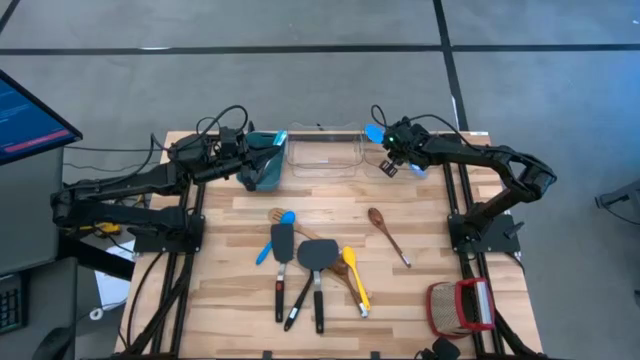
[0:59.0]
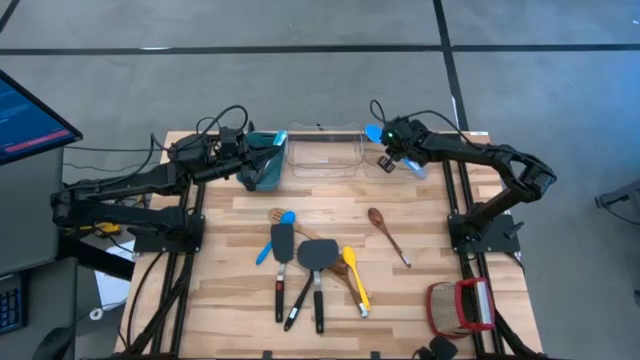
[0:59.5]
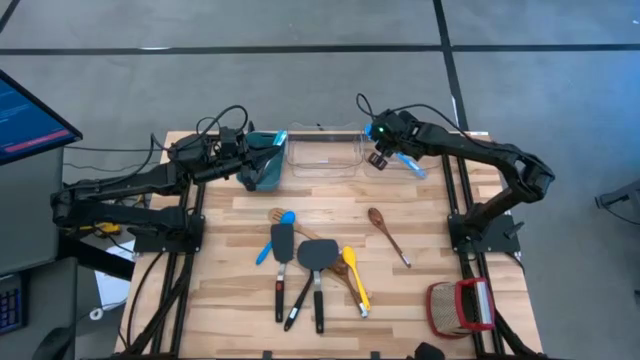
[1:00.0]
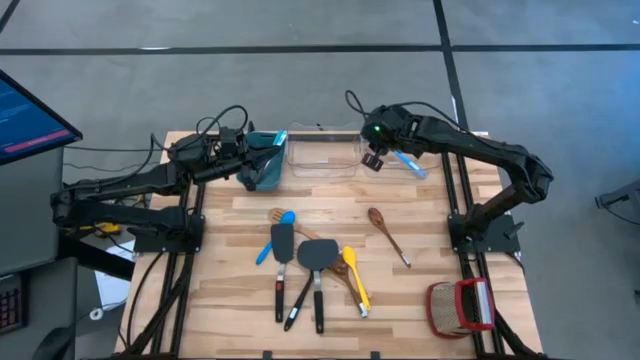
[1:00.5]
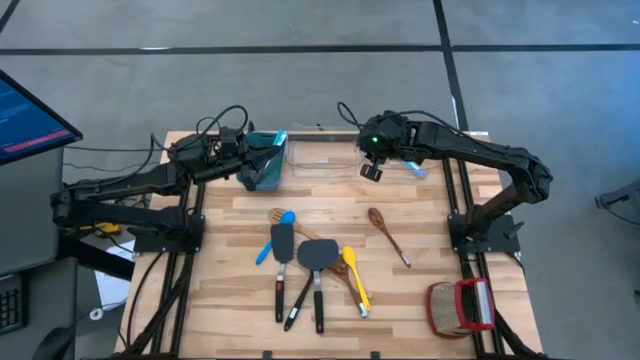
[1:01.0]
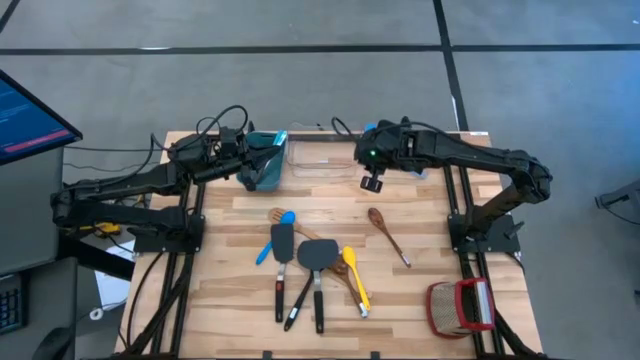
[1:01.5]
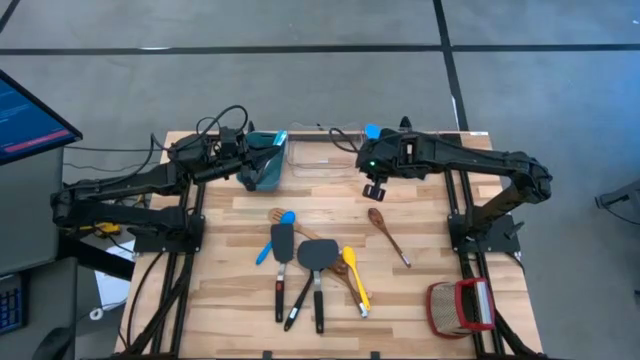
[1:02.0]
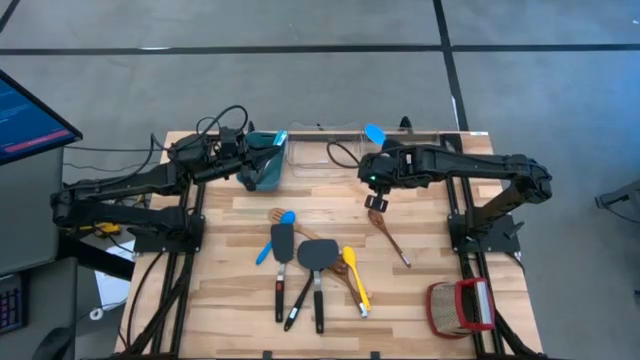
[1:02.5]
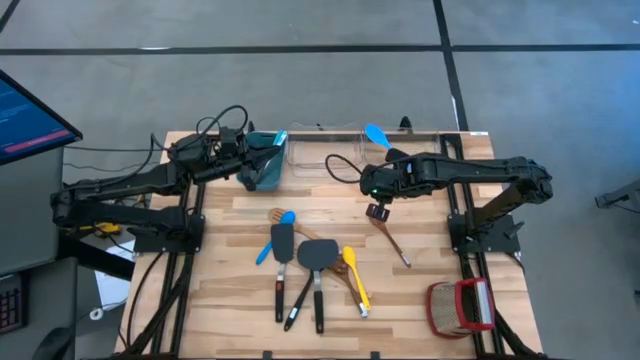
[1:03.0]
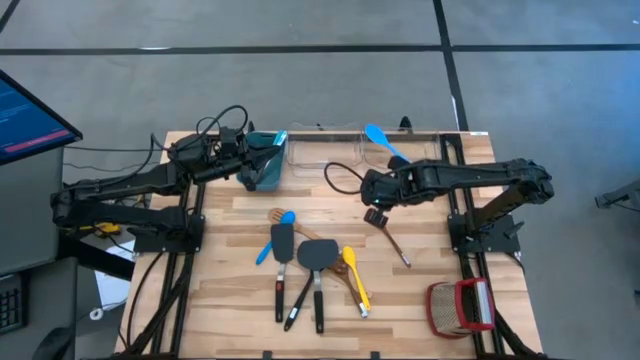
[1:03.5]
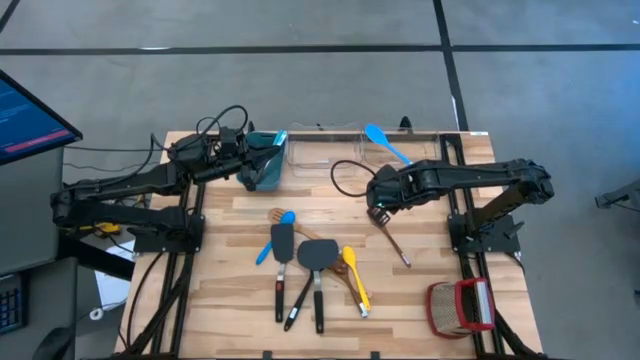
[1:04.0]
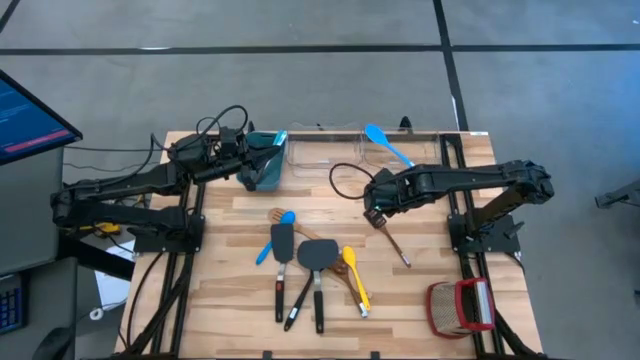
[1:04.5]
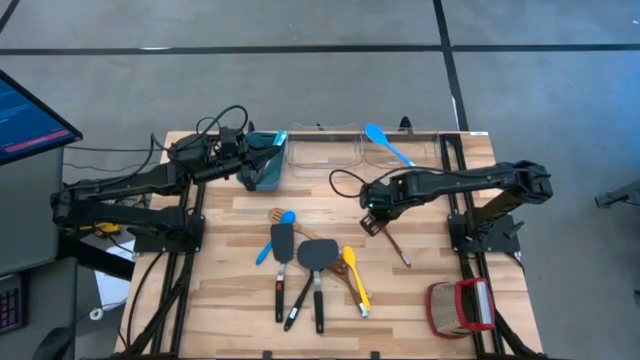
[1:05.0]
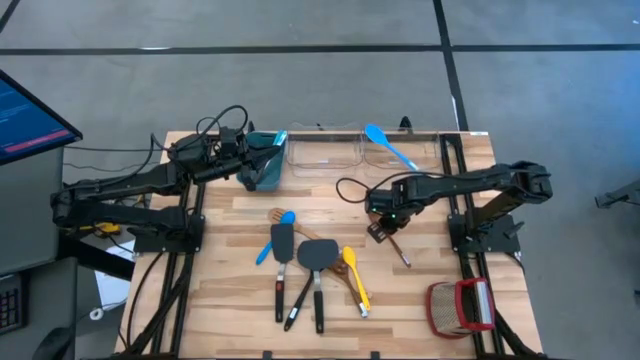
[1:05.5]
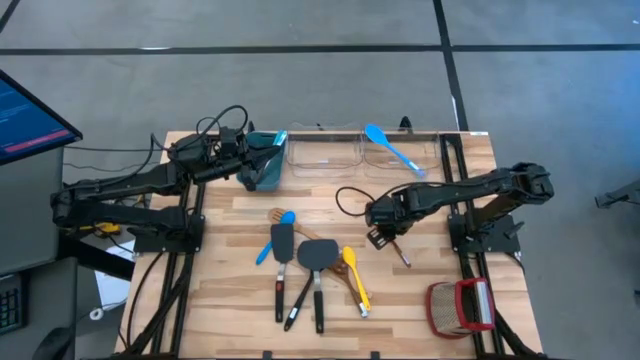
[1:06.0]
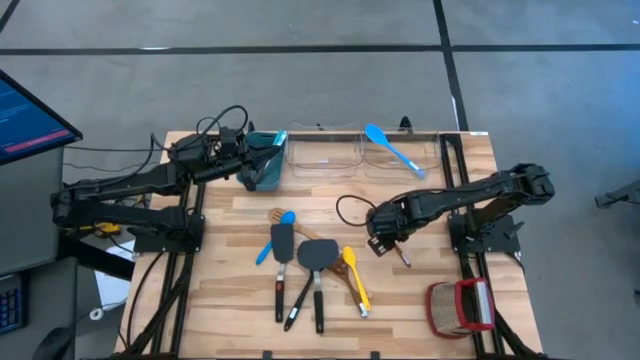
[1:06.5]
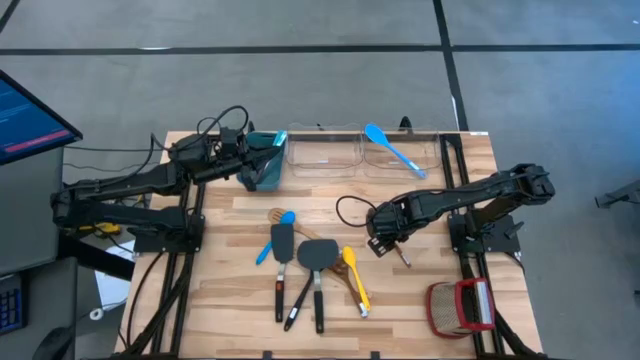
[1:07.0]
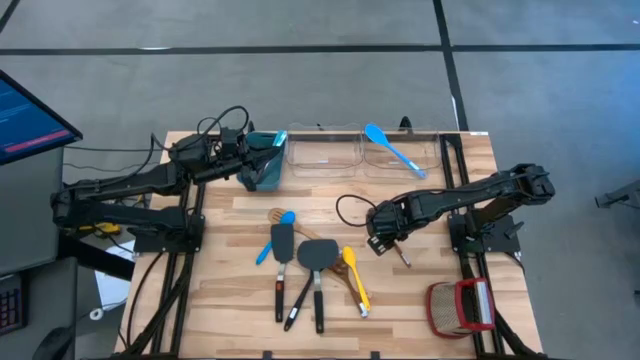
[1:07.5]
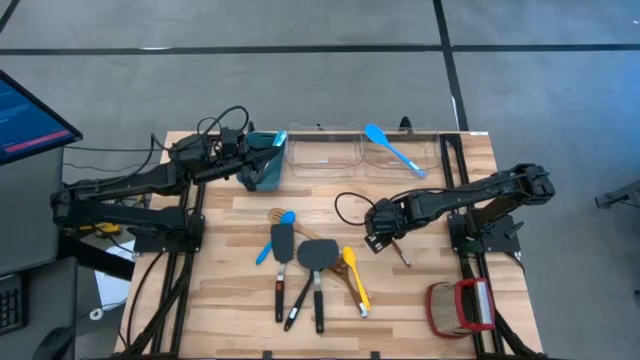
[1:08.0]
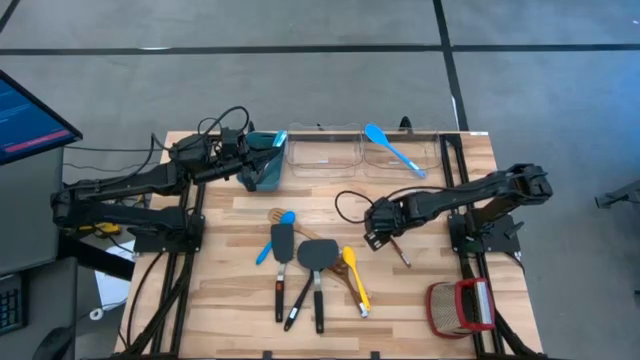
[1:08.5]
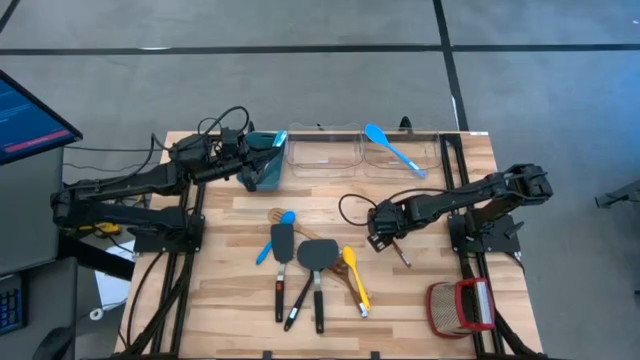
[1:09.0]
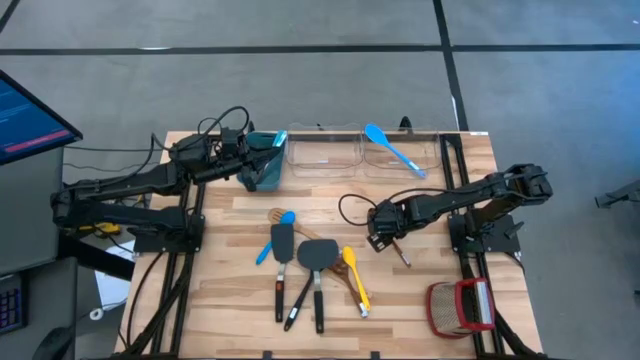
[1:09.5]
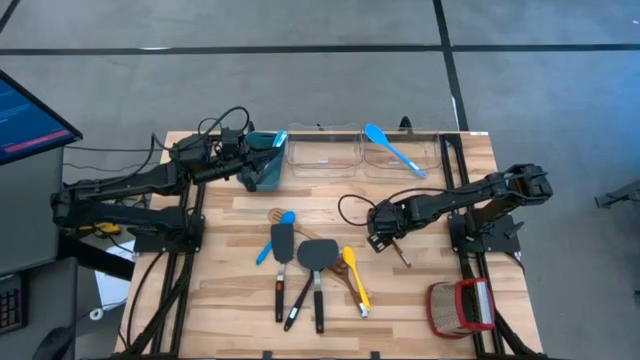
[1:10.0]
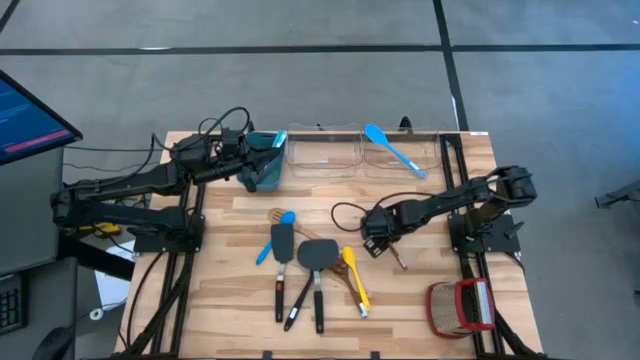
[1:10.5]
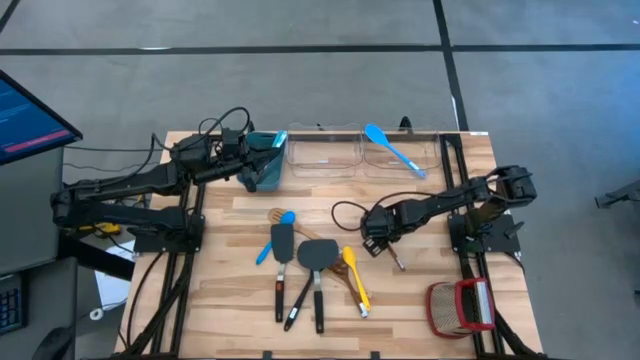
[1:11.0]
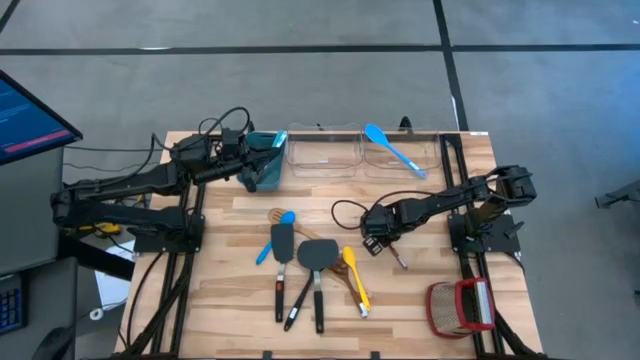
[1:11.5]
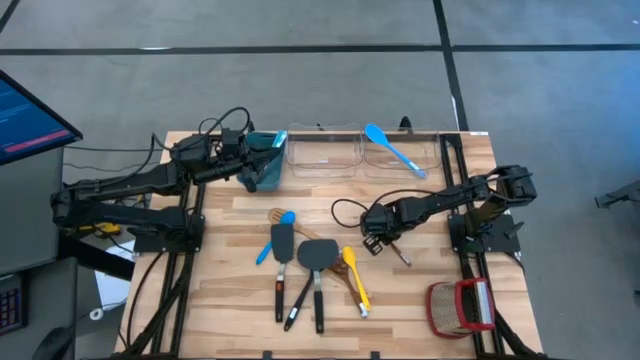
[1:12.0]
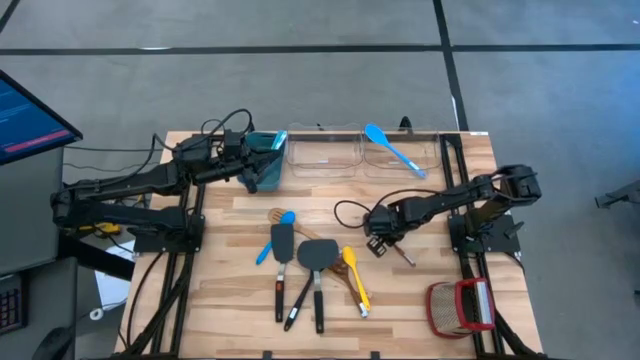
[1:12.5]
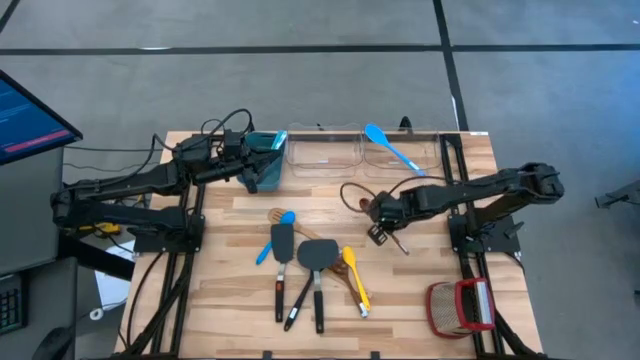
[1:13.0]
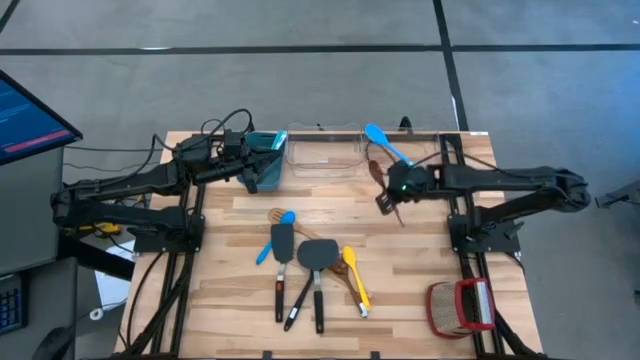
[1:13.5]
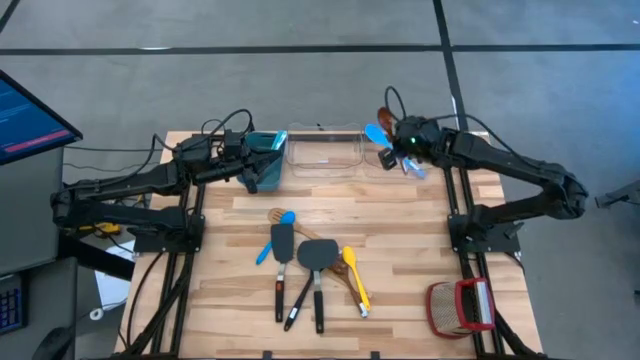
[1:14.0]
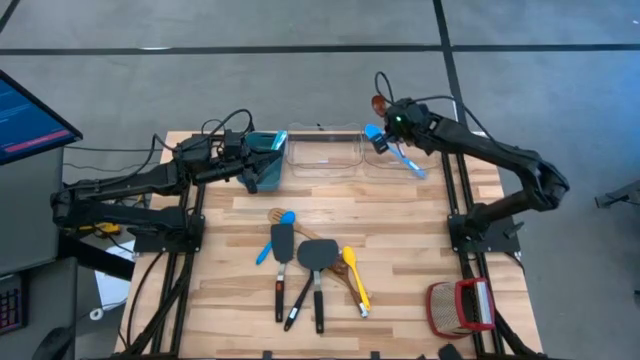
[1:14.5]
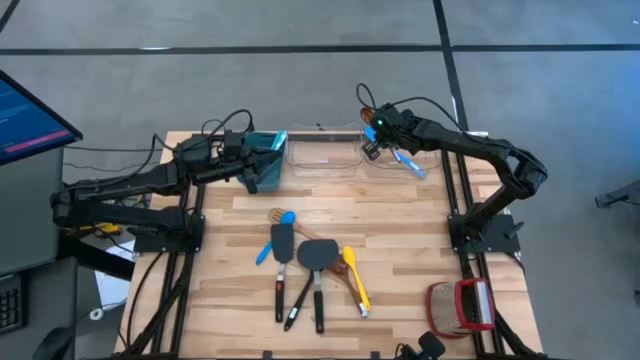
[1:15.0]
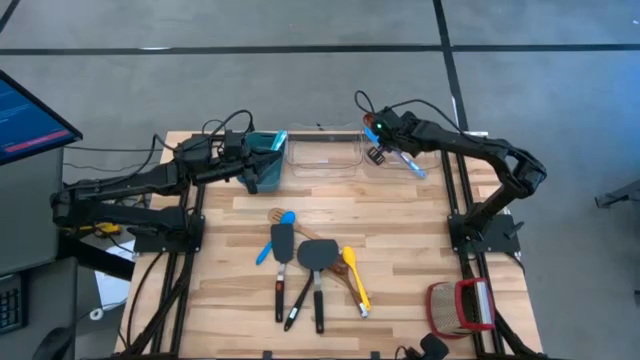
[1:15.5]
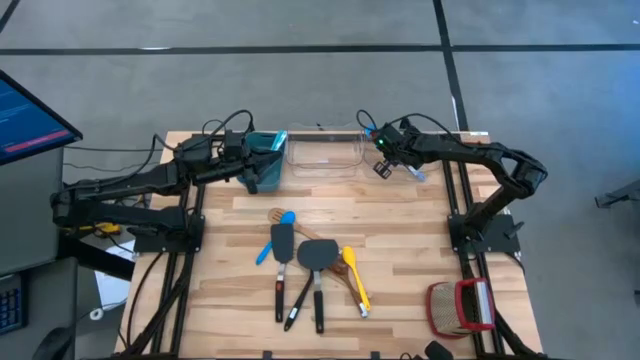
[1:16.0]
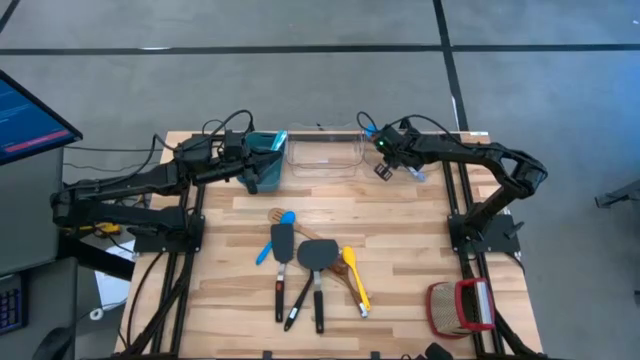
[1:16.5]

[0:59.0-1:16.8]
Task: Pick & Place Kitchen Items
Put the brown serving spoon into the right transparent bin

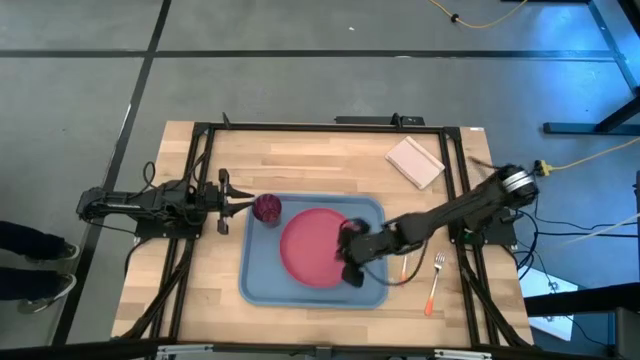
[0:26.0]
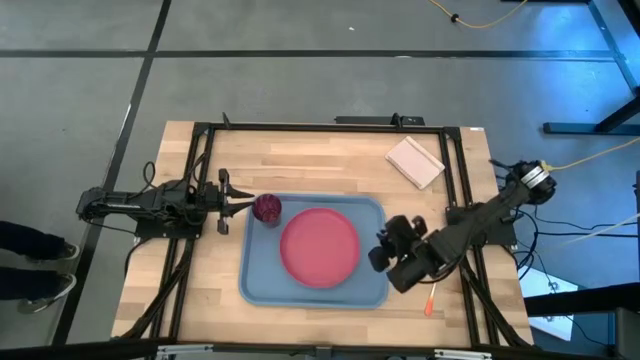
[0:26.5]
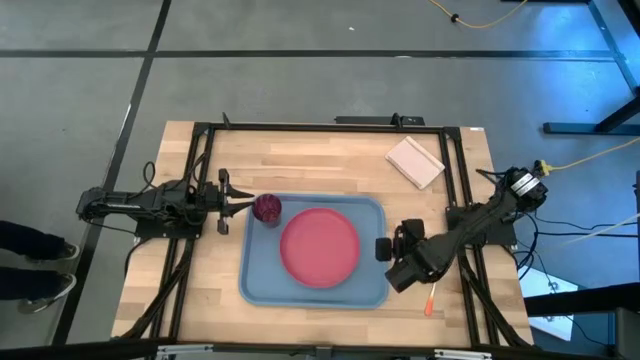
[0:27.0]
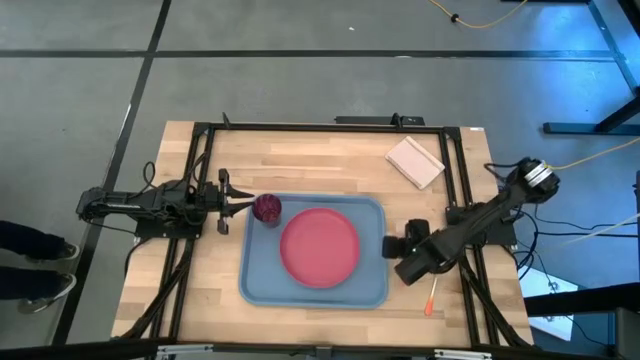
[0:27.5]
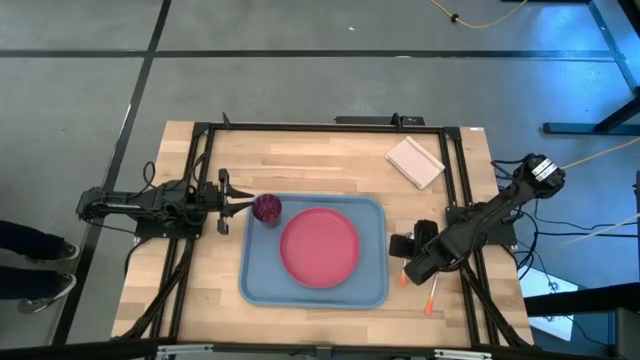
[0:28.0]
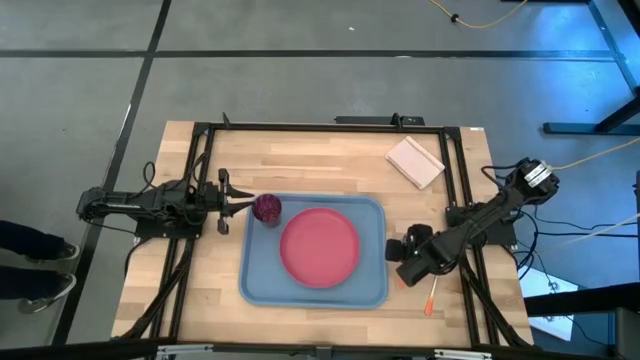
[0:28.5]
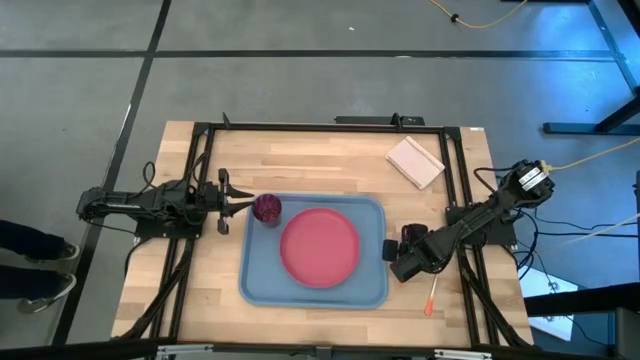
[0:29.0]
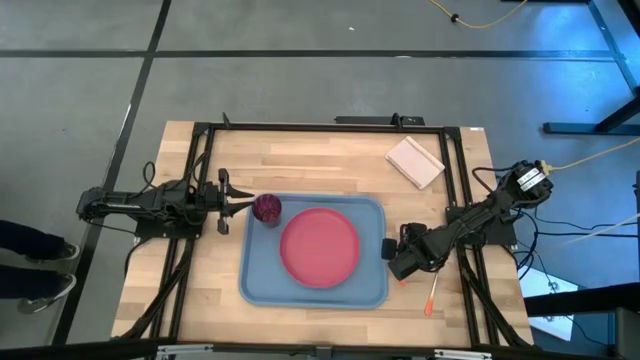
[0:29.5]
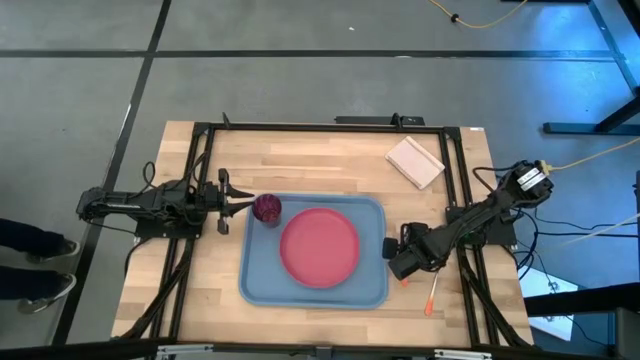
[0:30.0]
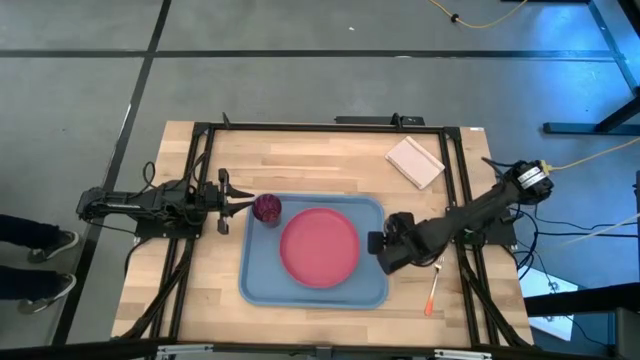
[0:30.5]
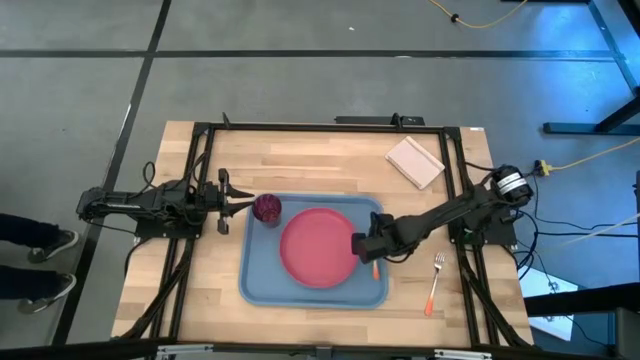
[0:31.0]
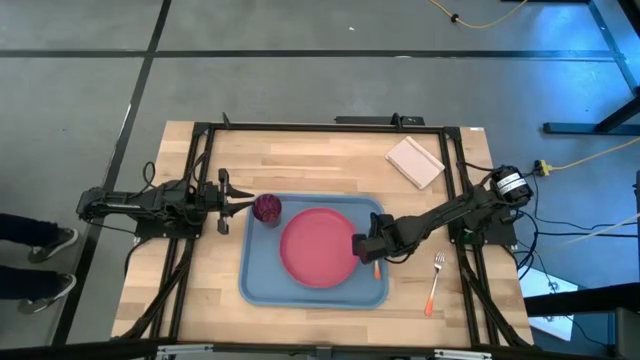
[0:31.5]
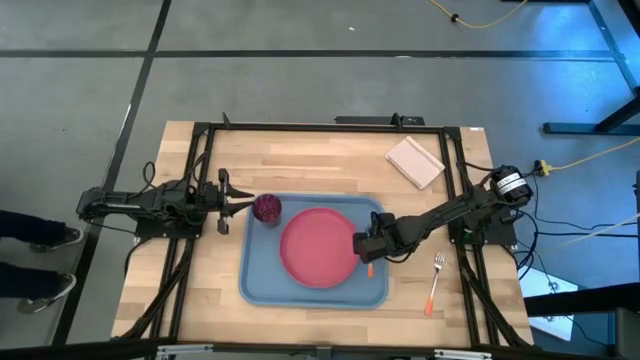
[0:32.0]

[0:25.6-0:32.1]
Task: Pick and place plate/cup/fork/spoon on tray
Put the orange spoon on the blue serving tray to the right of the pink plate
